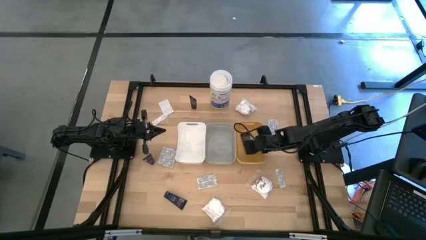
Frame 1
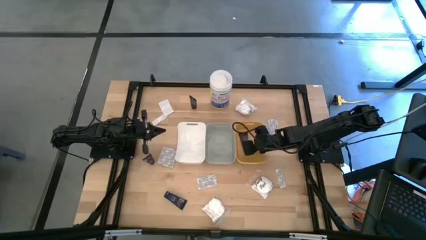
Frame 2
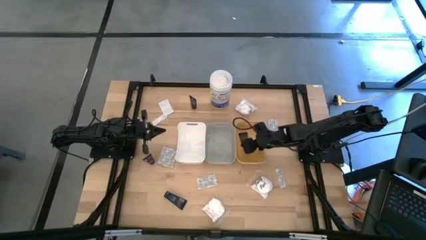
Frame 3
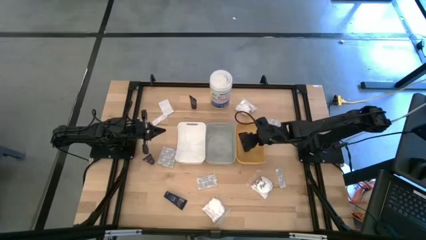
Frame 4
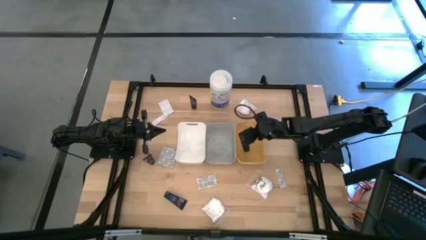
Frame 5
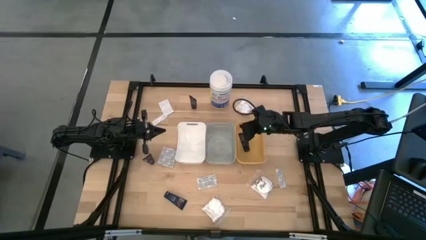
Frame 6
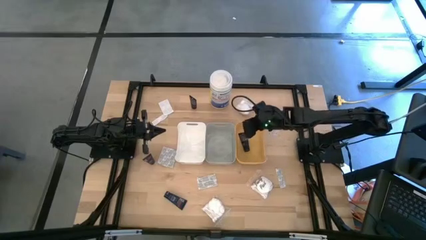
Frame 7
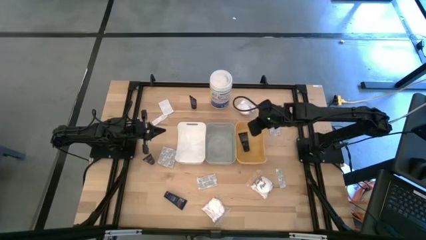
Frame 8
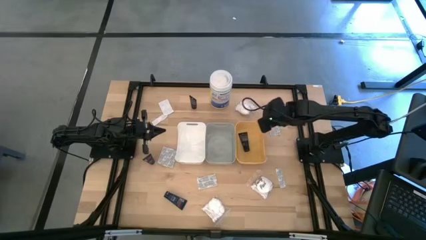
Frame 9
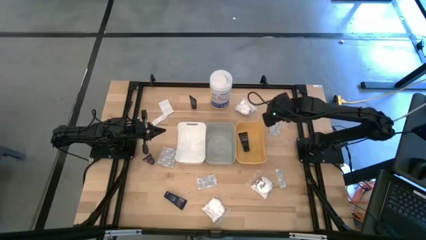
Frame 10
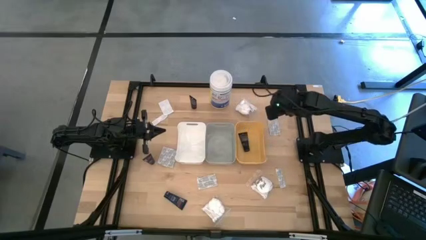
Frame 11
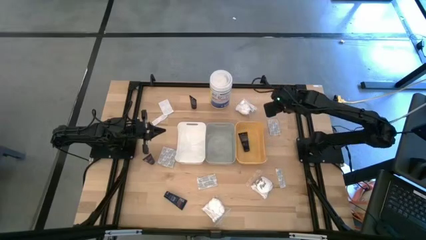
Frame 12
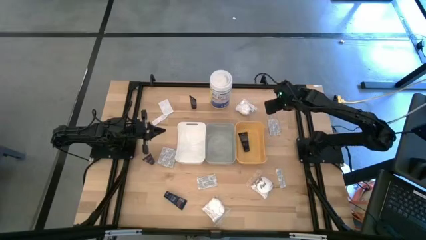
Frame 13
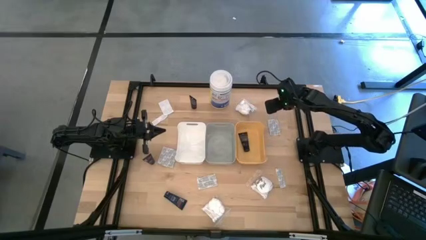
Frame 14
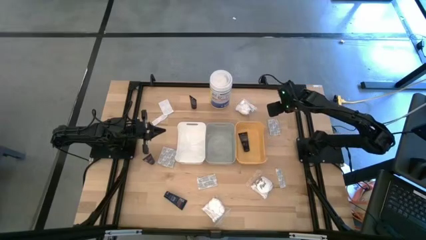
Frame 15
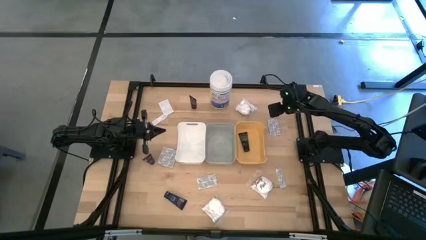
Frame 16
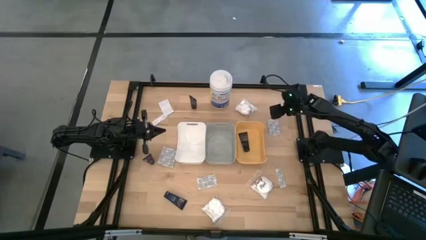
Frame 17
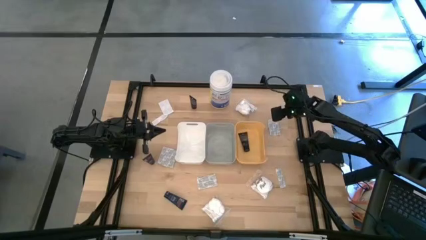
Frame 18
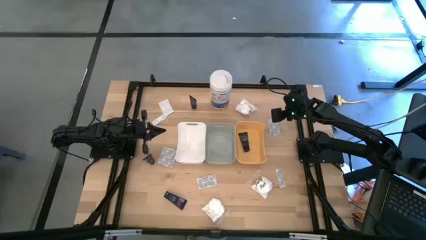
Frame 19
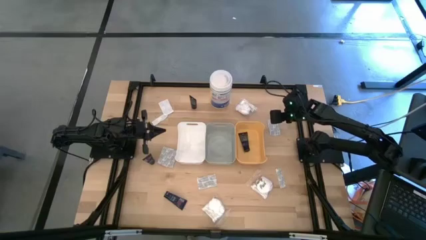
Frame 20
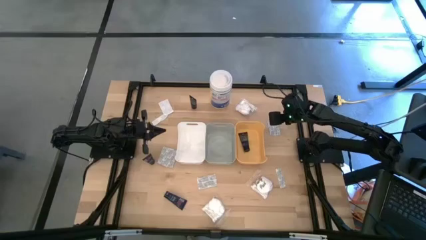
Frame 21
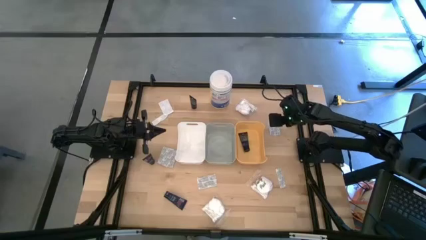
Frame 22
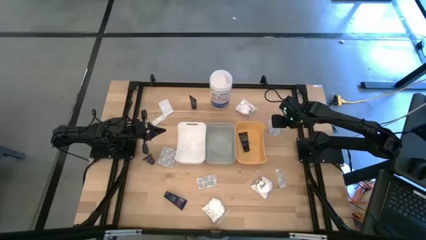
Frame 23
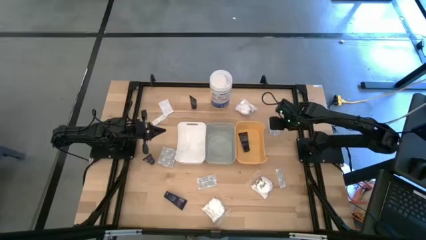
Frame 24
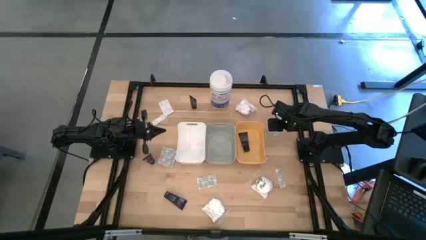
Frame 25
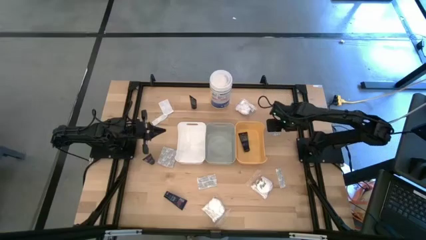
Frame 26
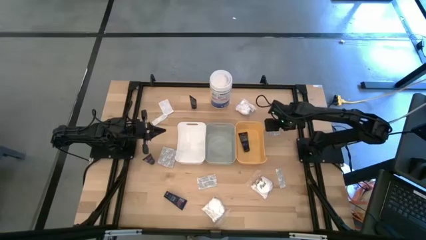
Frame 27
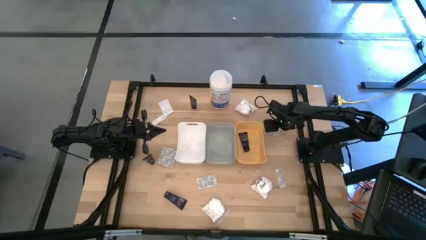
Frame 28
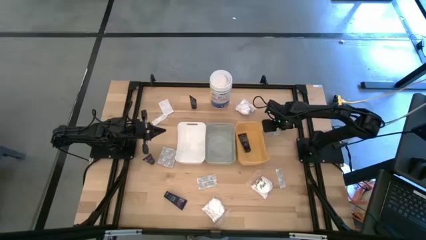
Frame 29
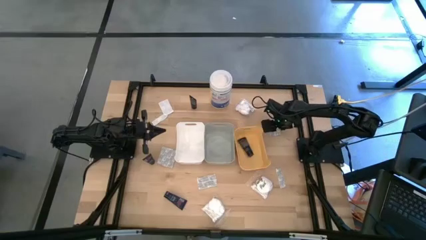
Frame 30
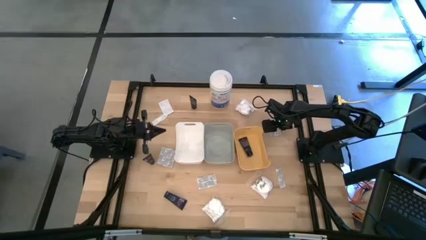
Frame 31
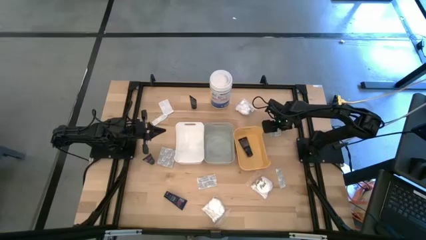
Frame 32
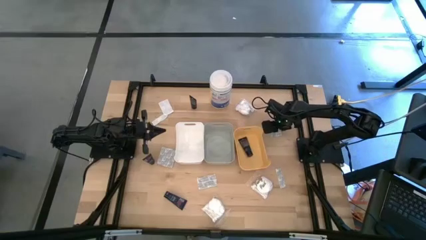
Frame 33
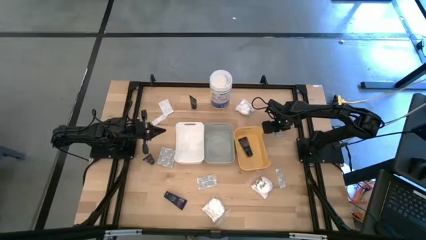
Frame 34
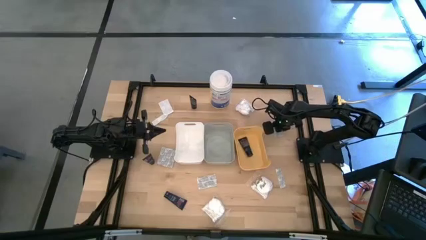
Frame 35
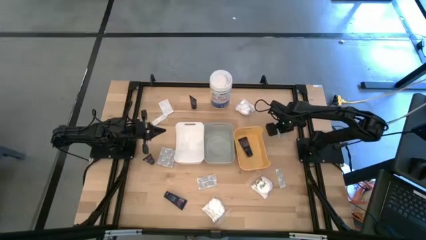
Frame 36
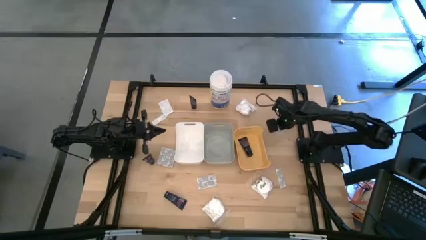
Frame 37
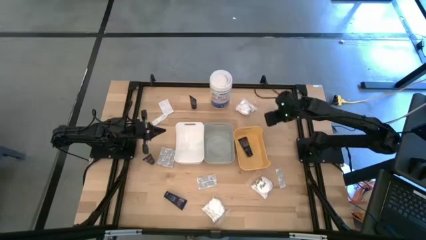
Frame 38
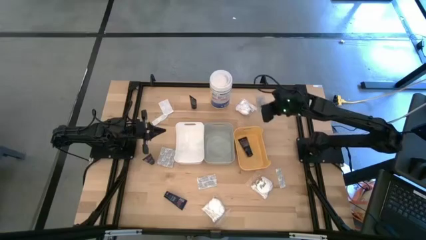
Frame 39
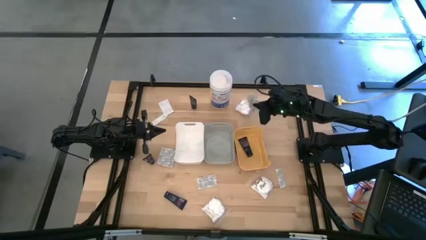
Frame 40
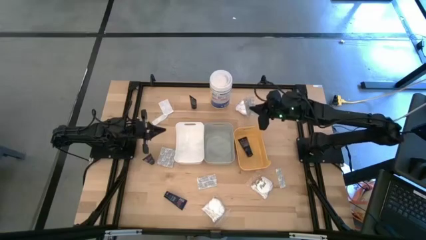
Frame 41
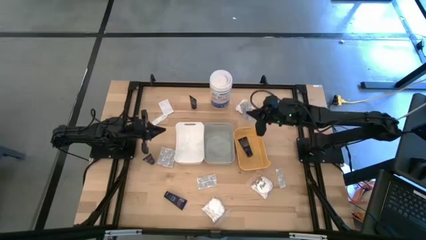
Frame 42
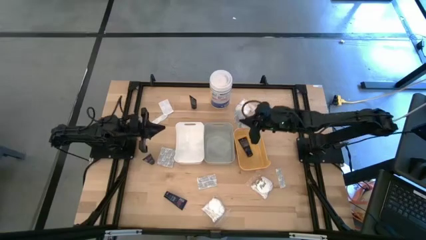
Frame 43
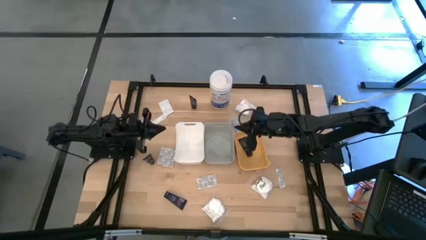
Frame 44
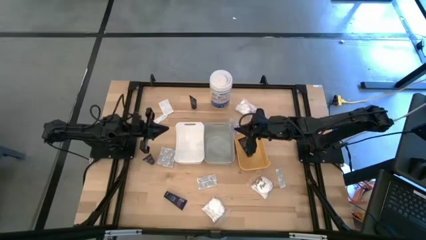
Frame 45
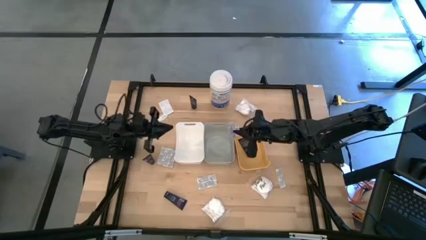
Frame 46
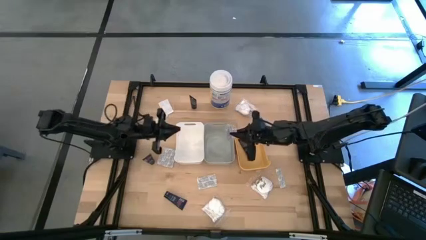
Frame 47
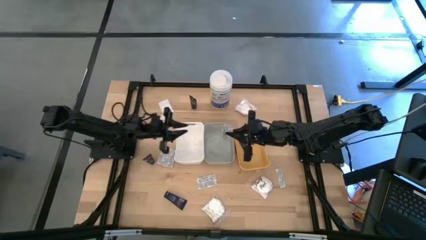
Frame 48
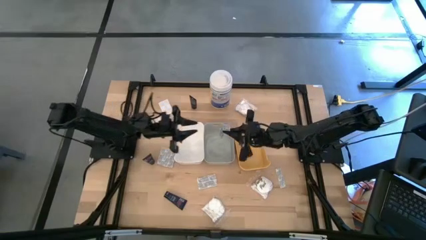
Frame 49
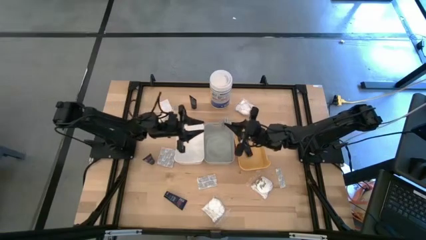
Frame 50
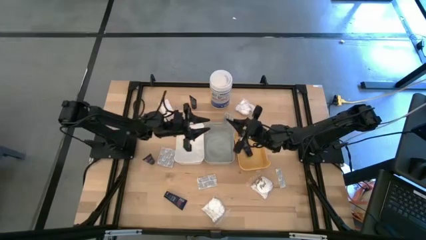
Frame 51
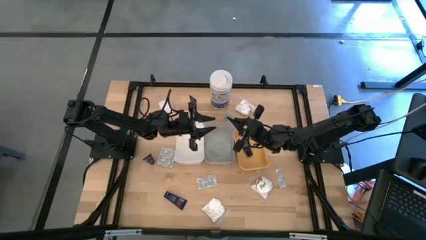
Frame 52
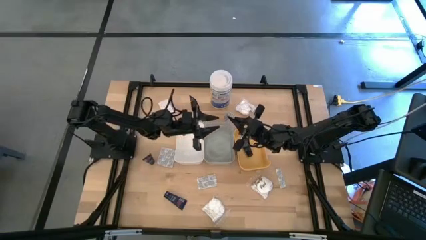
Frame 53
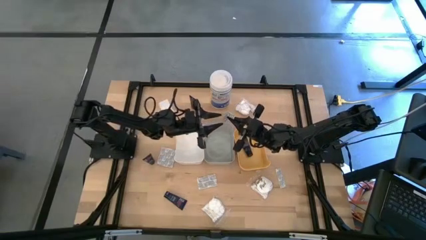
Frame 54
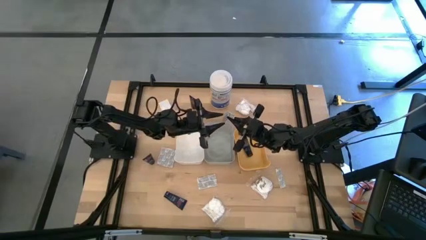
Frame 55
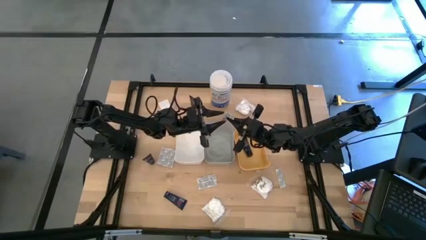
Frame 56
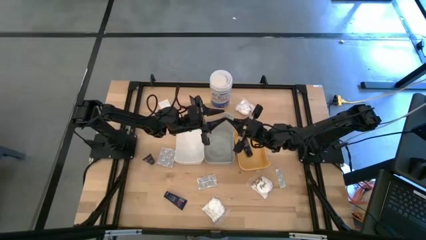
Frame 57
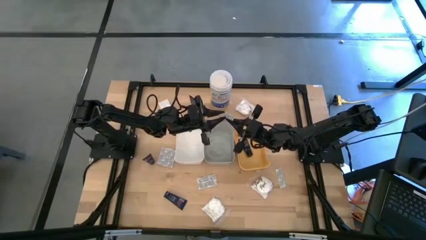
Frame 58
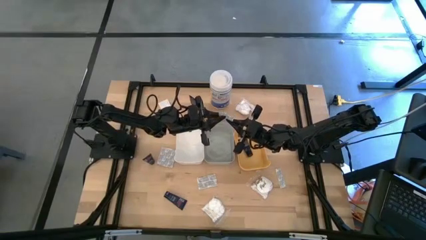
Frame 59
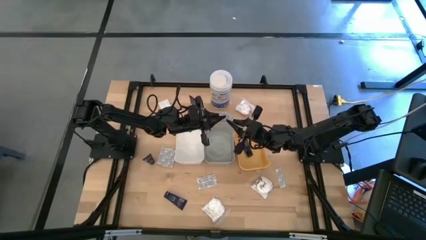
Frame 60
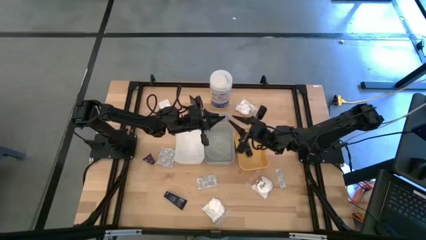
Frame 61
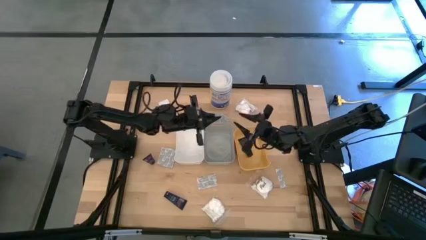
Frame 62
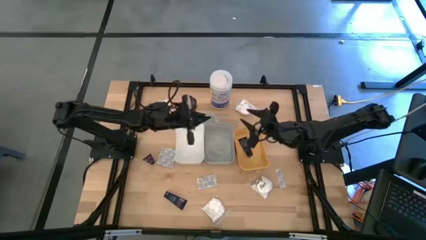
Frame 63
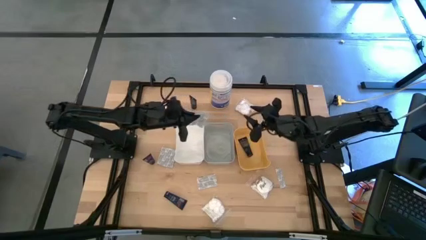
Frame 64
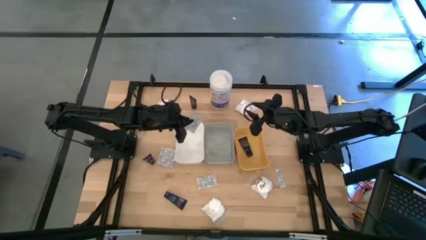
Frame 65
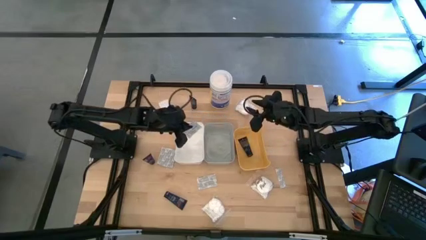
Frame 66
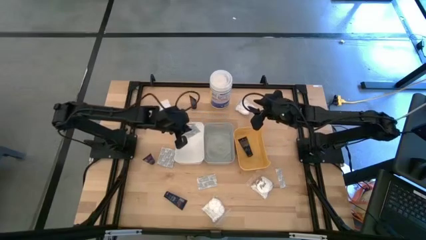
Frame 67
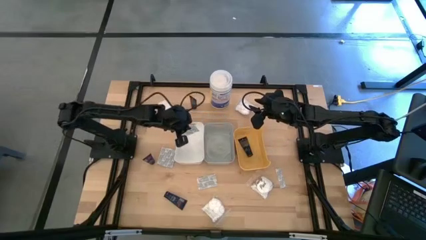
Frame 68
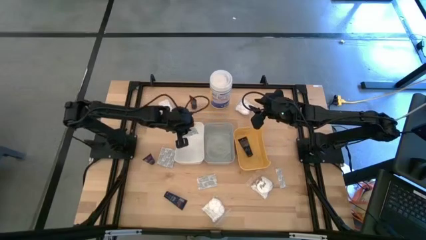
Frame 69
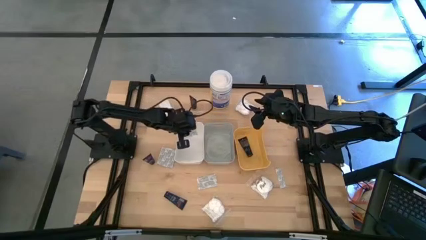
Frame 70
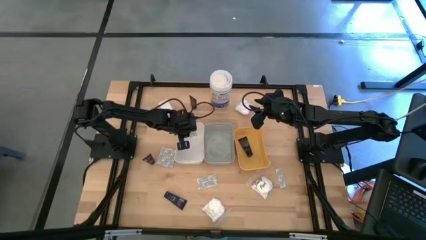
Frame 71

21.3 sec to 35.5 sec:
Task: Pick & Place Travel size toiletries
Put the white band-aid into the white bin

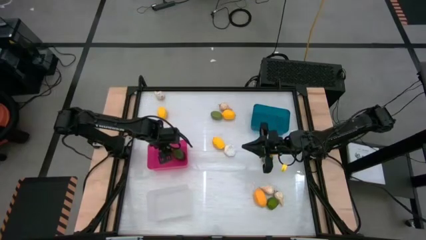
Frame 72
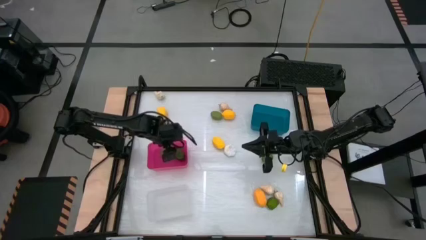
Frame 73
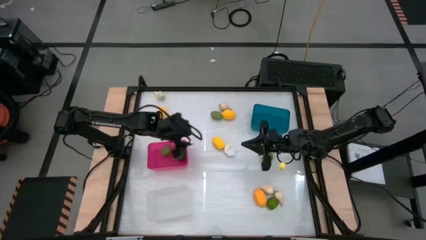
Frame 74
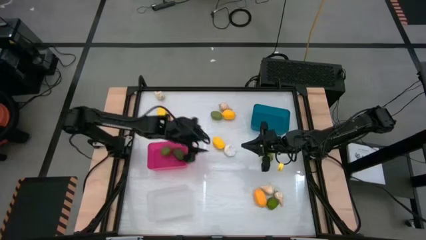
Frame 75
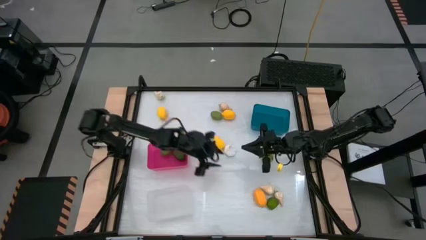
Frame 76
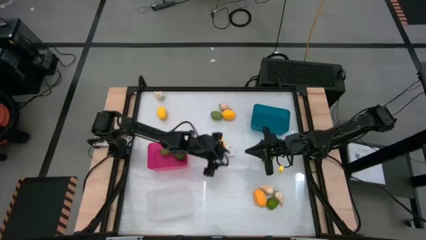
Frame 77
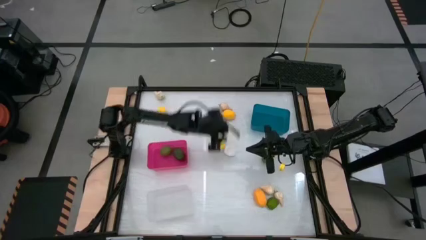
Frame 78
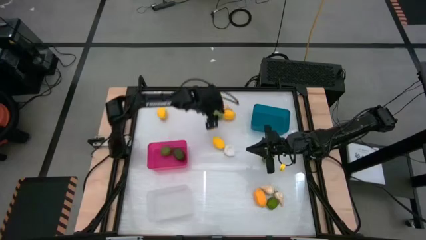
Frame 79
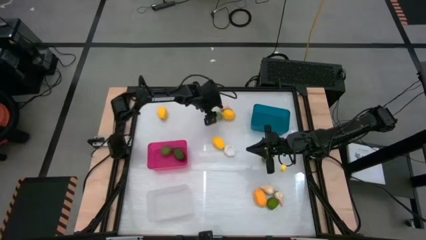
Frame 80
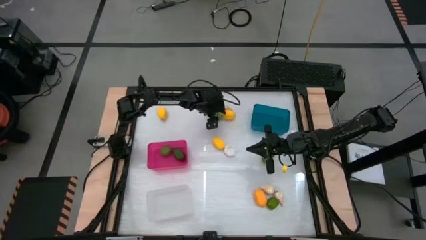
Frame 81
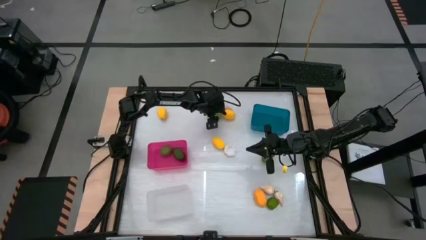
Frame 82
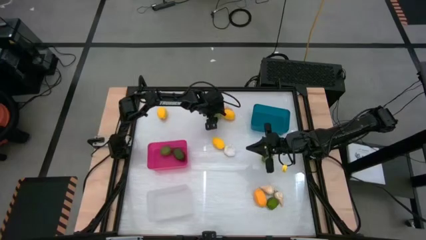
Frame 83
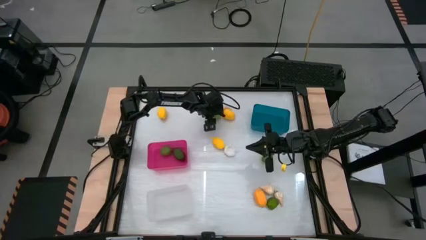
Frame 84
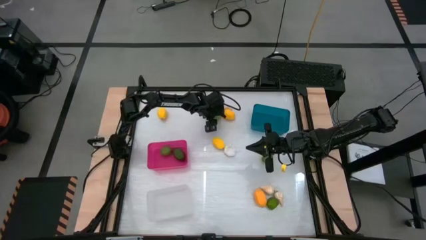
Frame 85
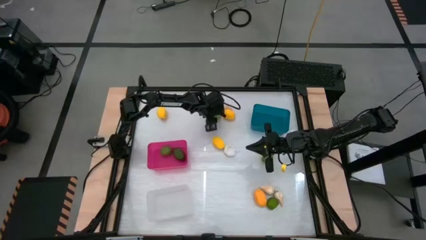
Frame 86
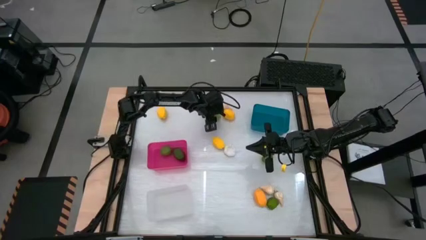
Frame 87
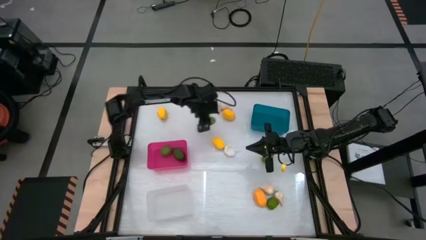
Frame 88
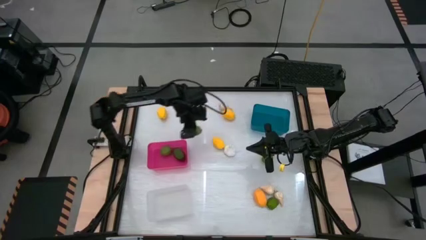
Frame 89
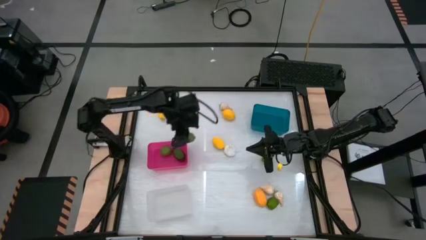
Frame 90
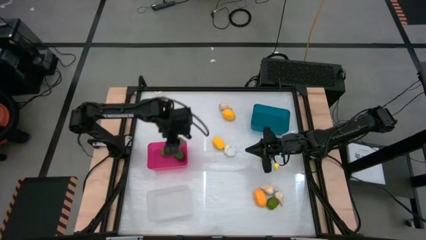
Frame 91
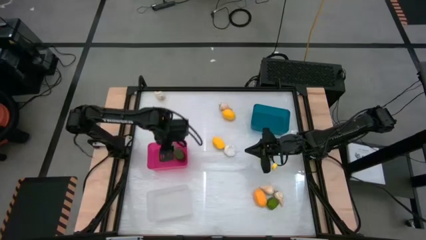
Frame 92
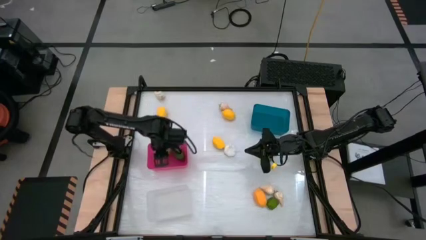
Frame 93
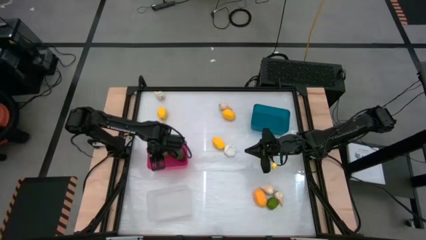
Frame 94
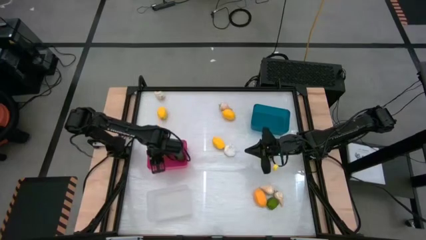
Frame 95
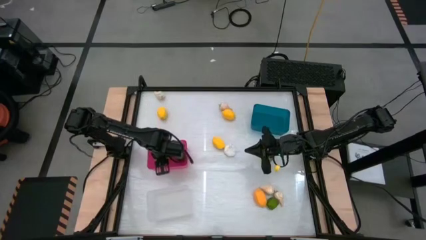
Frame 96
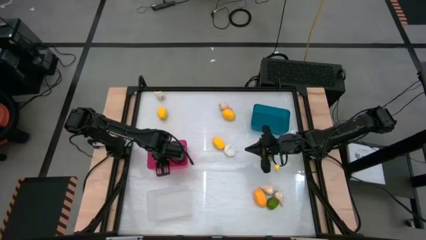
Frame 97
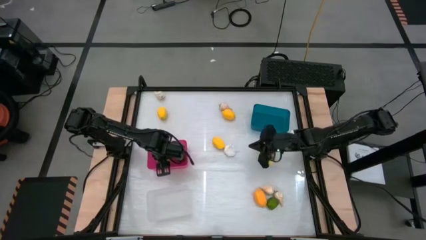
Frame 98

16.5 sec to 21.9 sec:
Task: Sort produce into baskets
Put the lime into the pink bin
